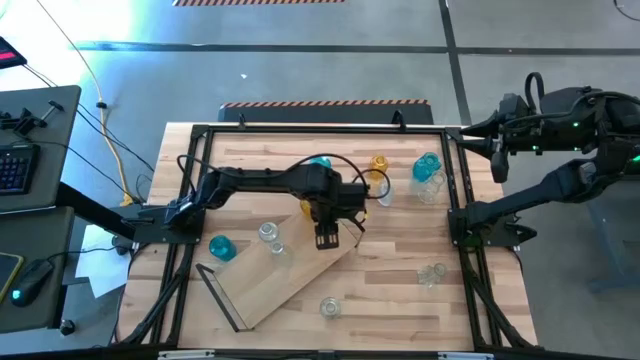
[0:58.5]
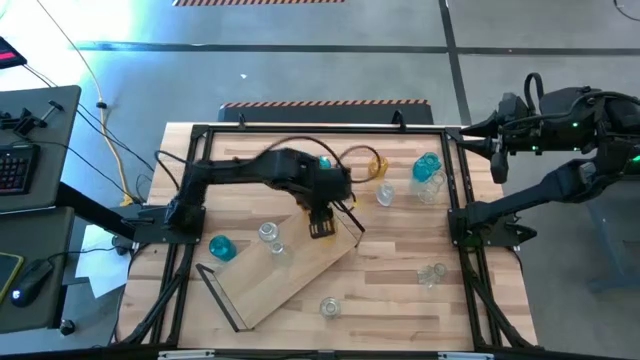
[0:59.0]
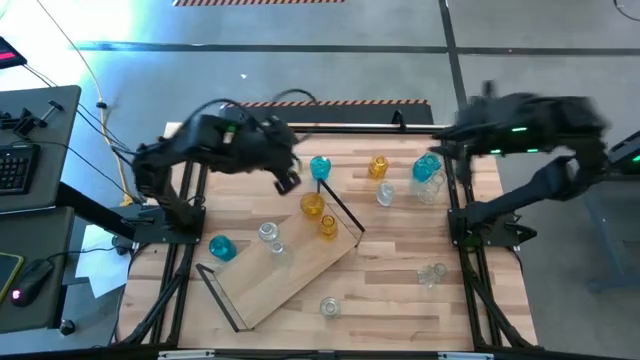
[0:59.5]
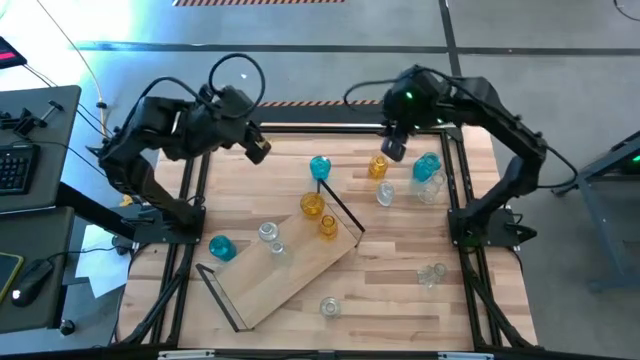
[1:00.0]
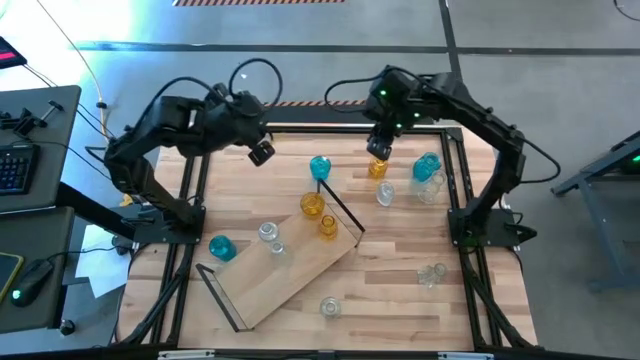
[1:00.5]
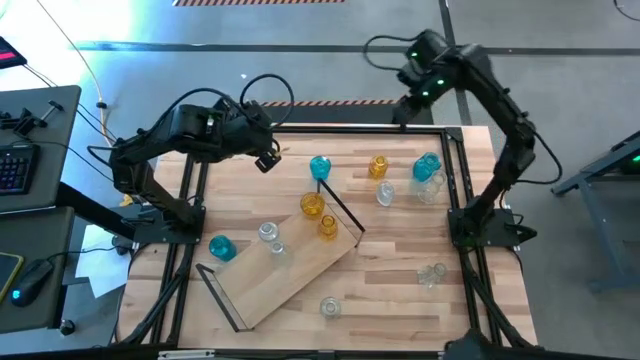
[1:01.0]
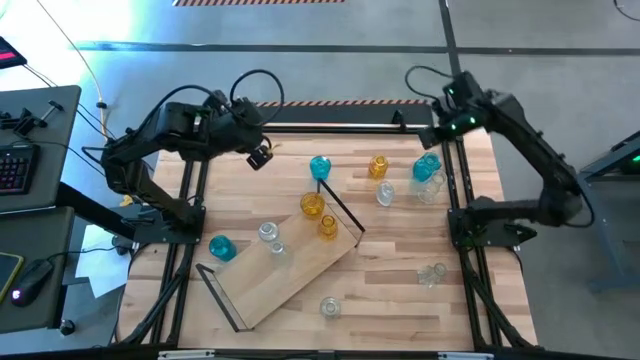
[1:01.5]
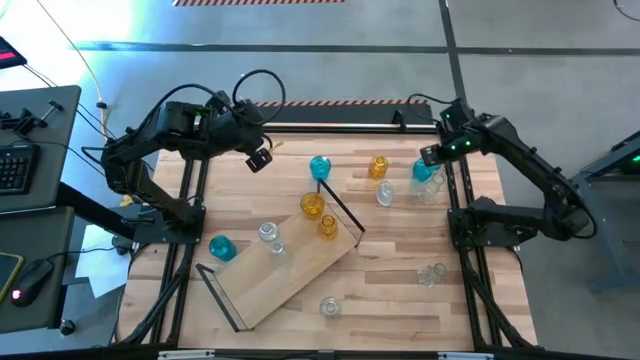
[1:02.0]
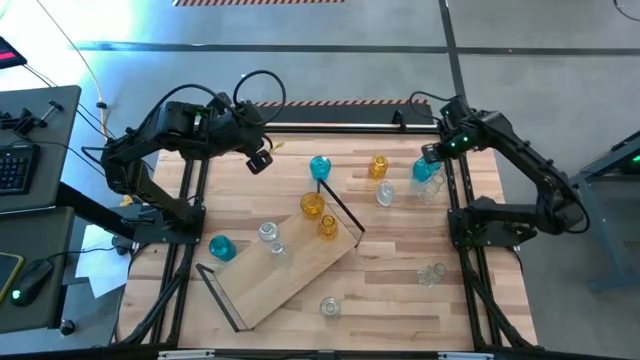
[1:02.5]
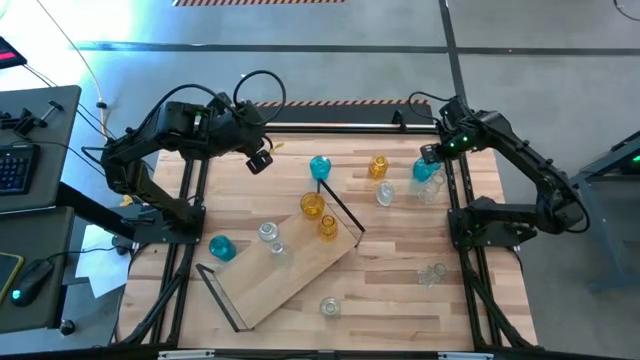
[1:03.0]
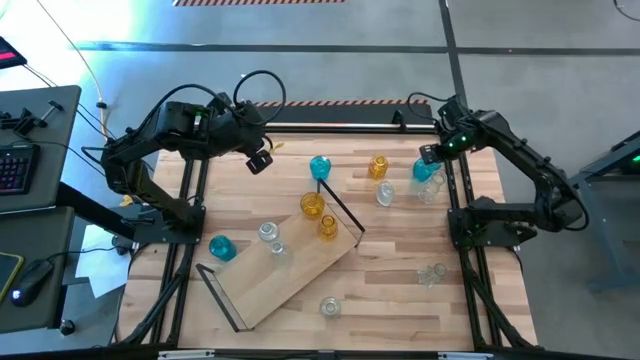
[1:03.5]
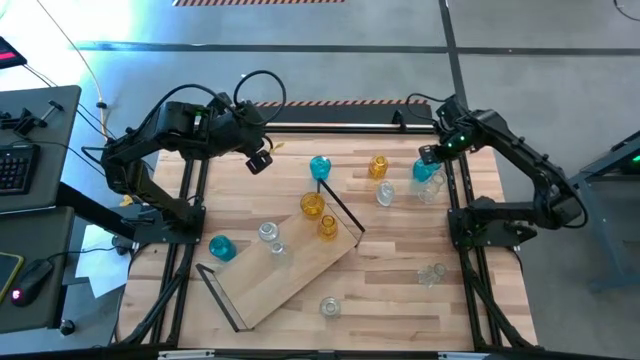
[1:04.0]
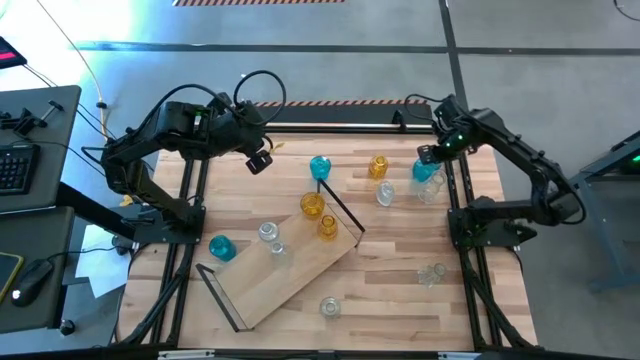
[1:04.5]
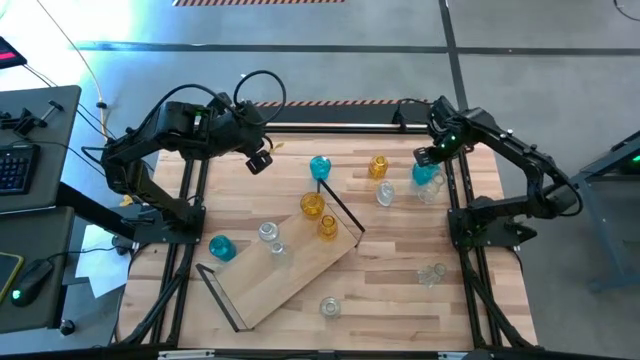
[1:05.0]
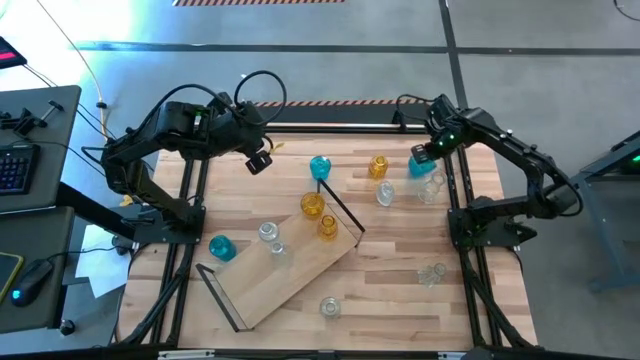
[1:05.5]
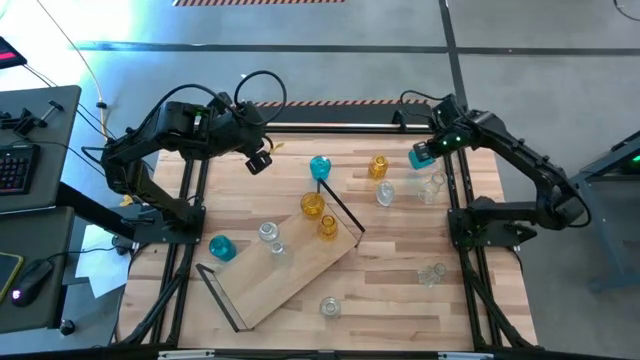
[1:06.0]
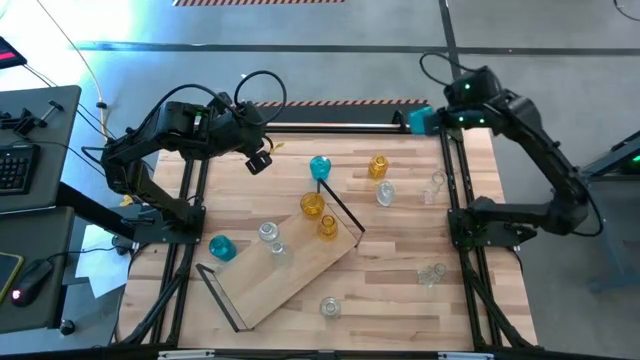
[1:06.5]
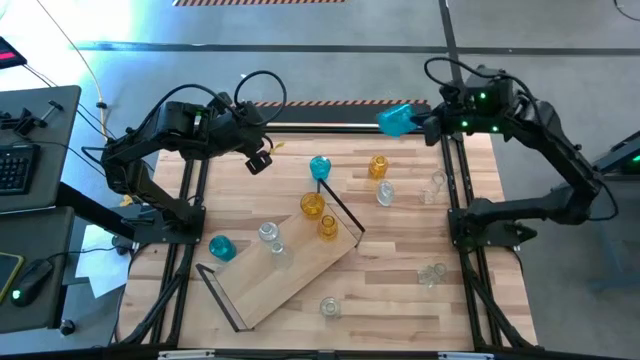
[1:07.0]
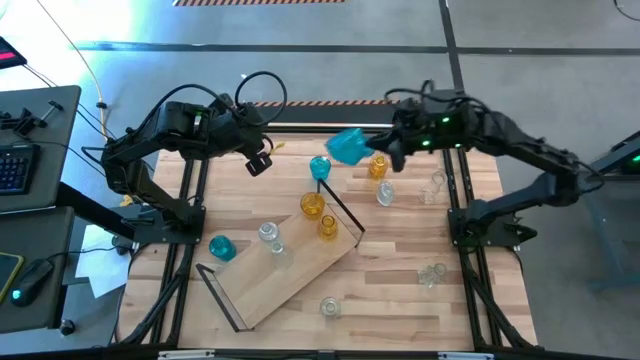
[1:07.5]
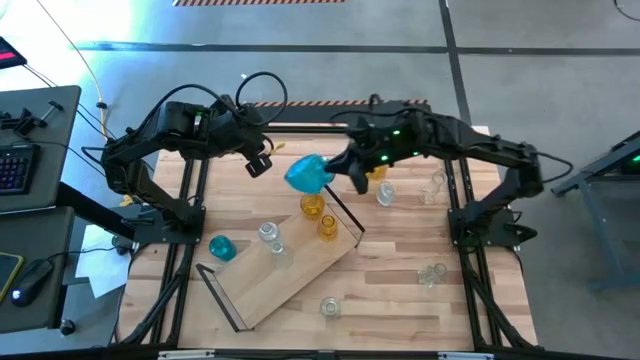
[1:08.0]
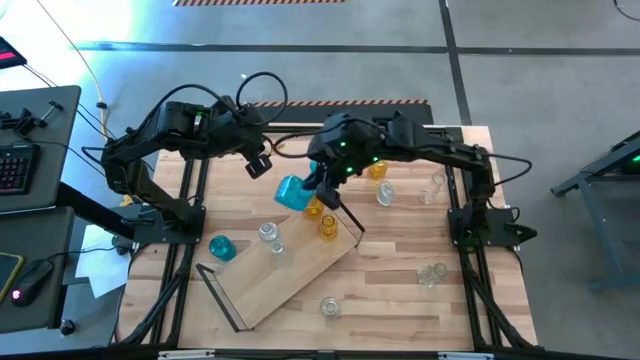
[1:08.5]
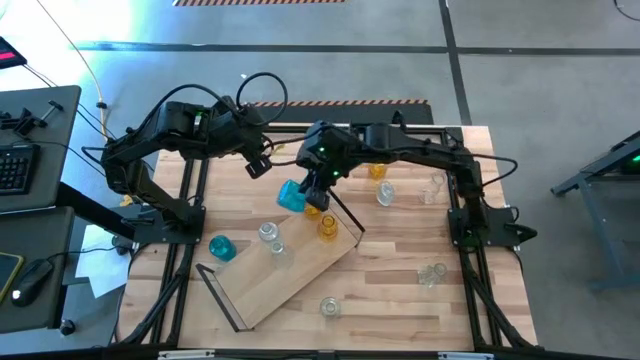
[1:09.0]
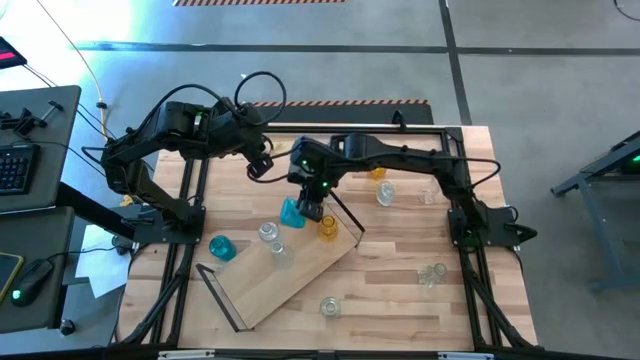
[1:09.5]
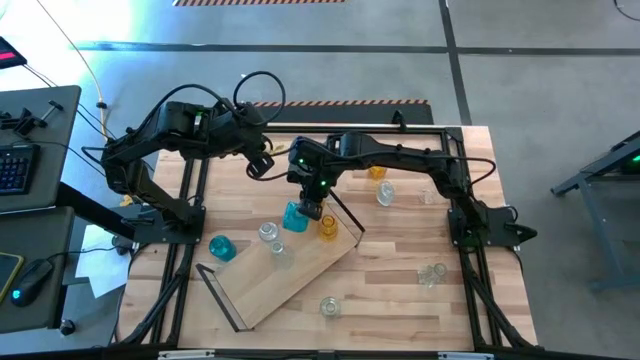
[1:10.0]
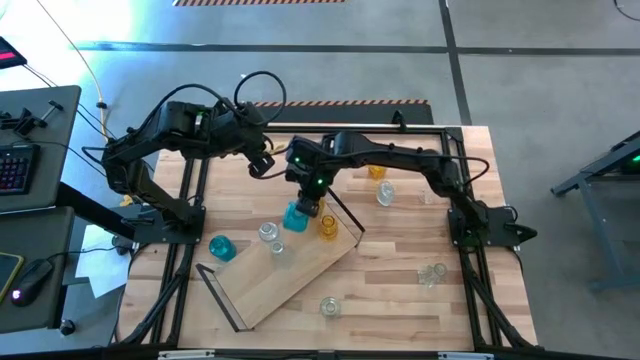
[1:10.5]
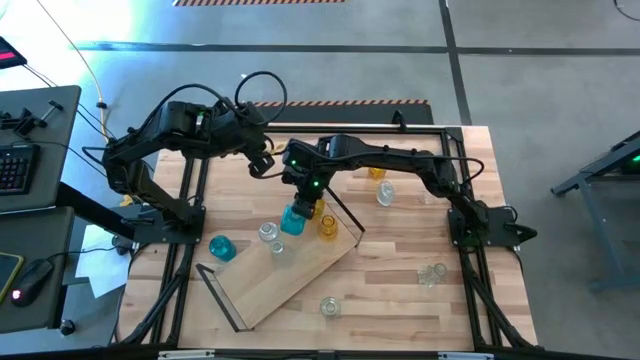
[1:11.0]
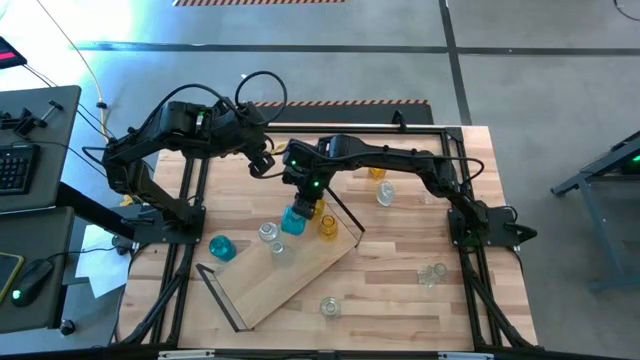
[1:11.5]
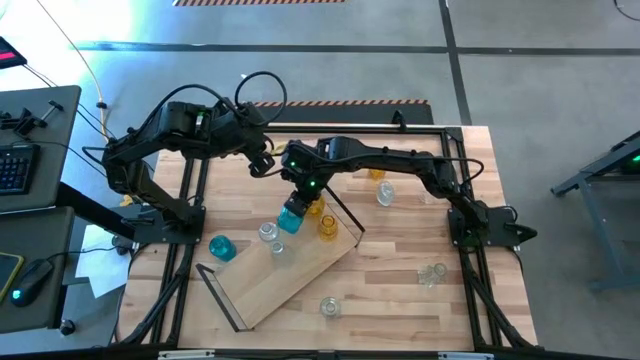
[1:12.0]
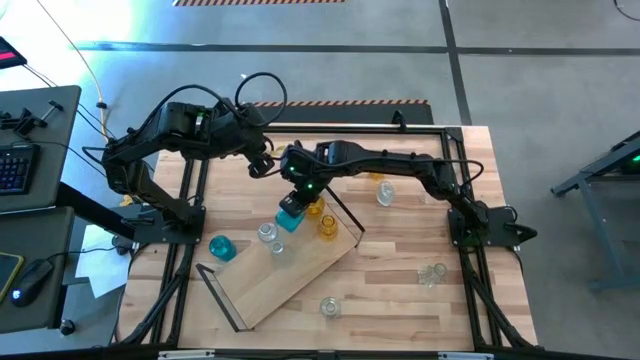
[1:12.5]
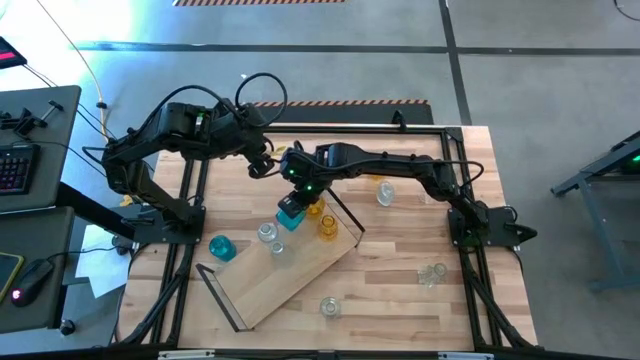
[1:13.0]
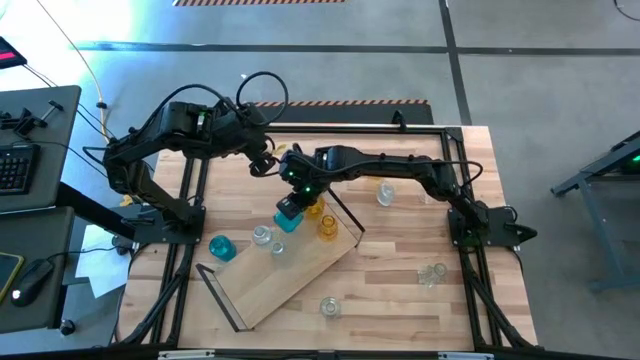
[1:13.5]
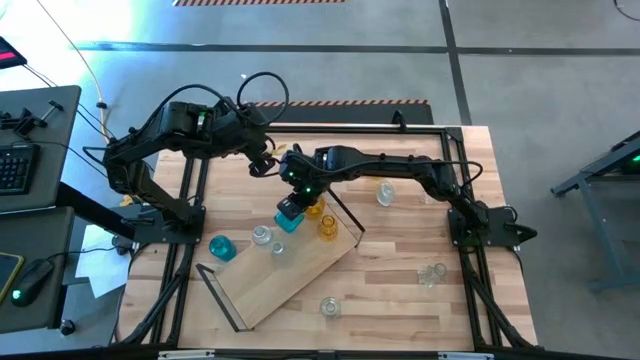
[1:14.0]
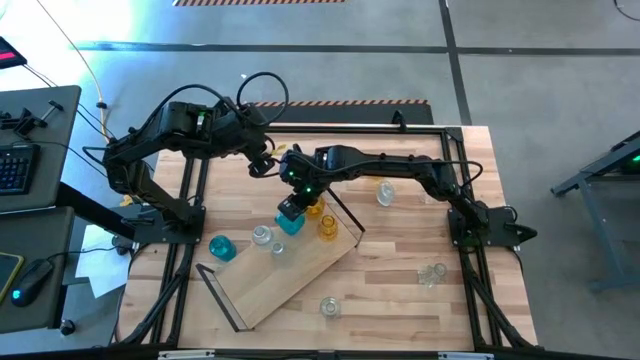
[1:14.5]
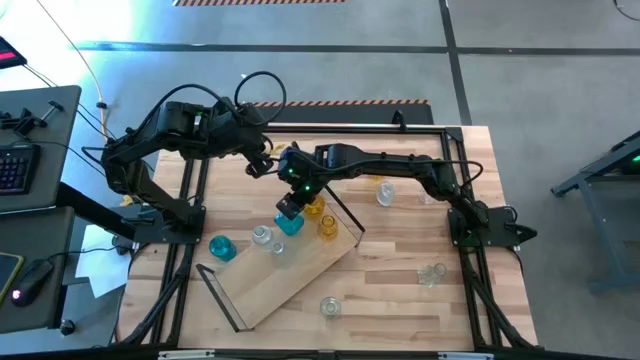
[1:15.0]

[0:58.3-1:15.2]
Task: sort vases onto shelf
Put the blue vase on the shelf

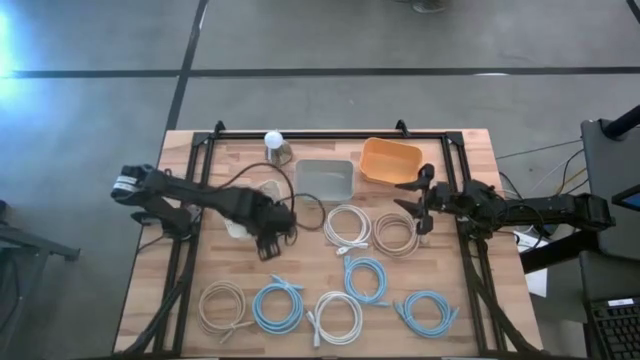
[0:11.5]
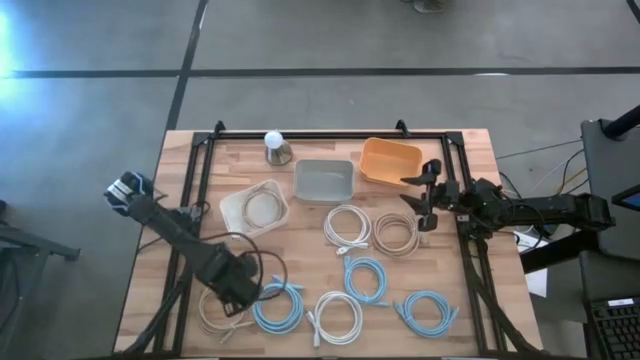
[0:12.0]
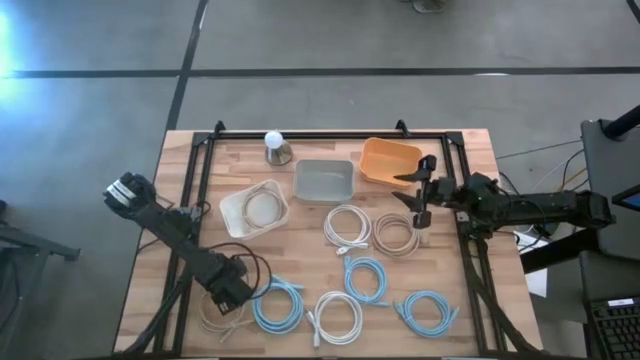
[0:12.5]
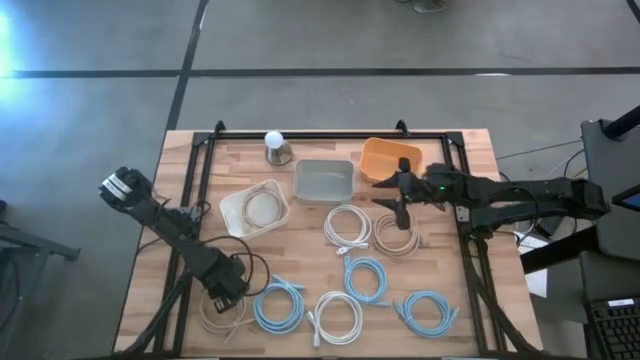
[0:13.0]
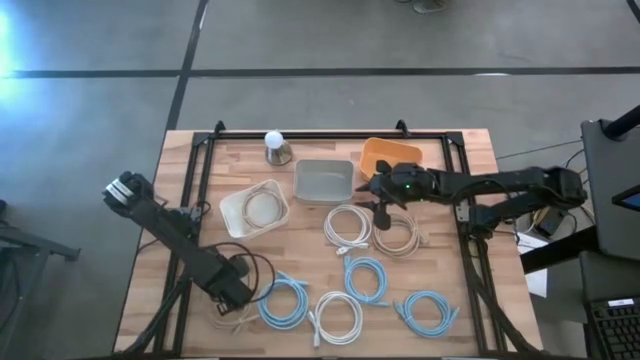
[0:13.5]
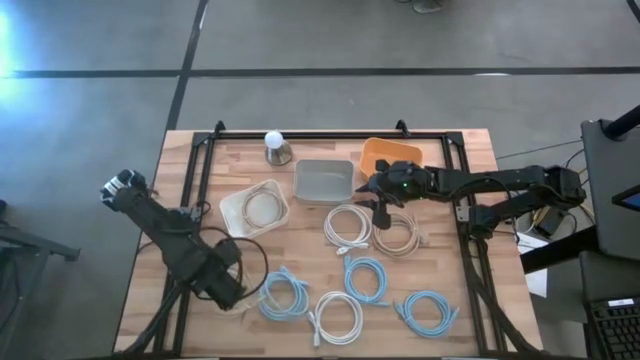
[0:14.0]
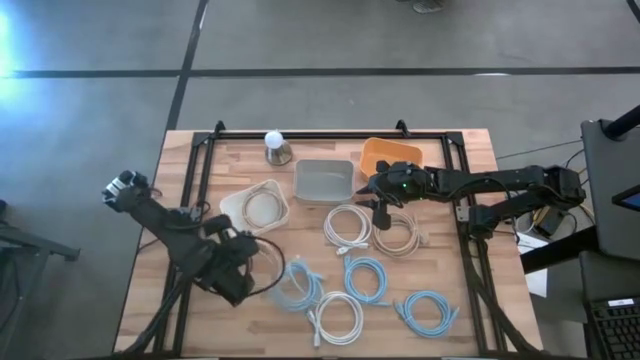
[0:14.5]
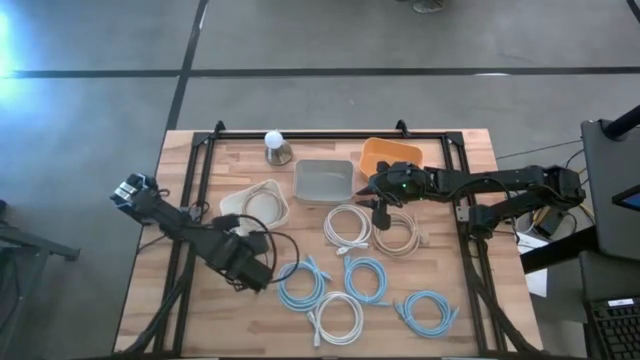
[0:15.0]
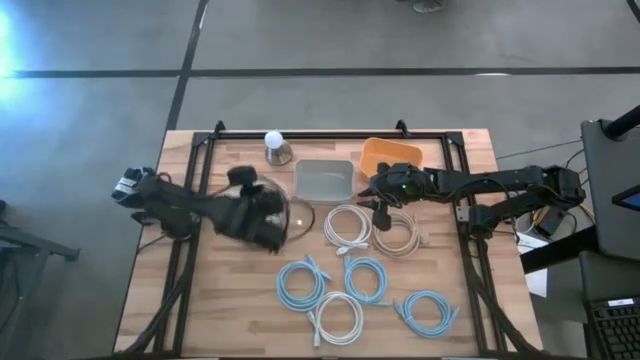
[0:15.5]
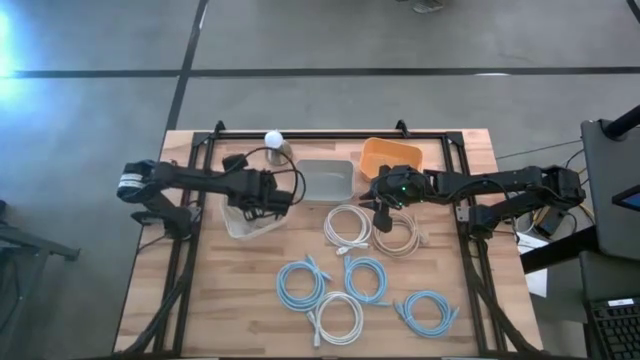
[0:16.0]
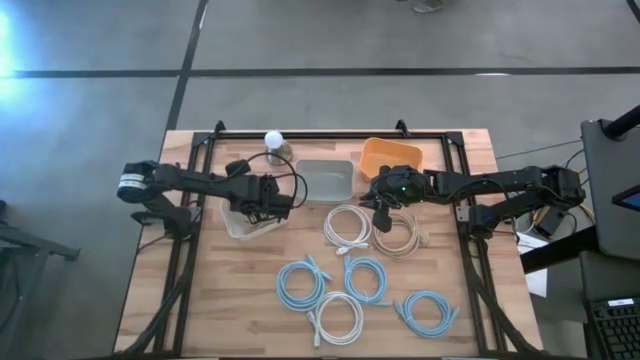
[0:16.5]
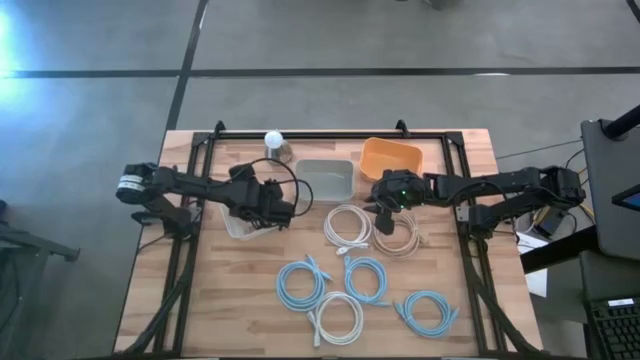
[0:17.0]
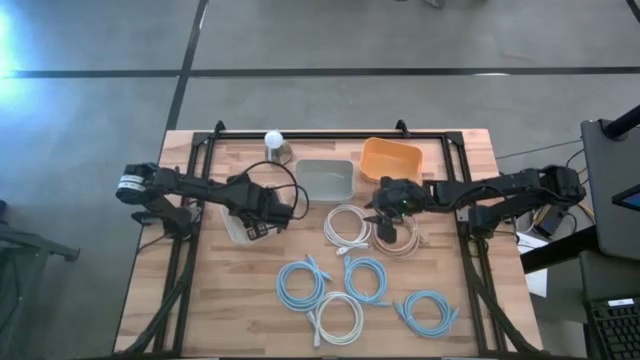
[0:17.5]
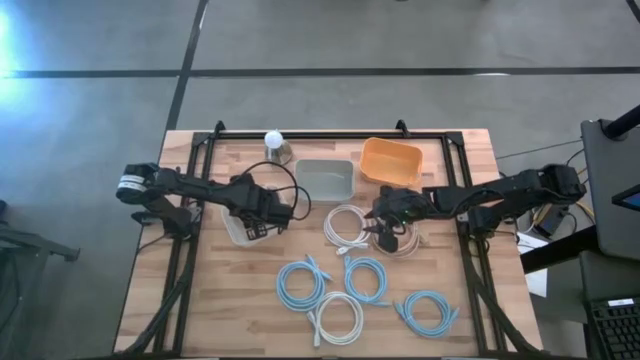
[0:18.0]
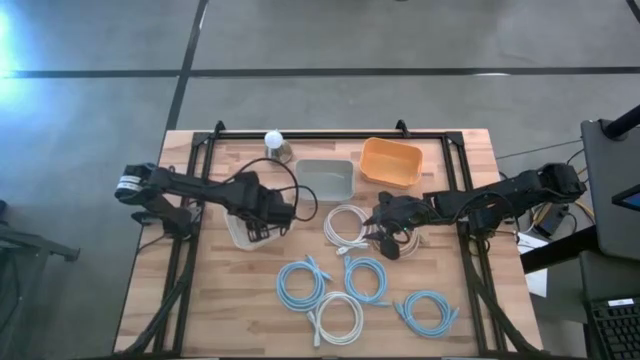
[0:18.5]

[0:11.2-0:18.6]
Task: Sort HDMI cables
Put the bottom brown HDMI cable into the white bin
